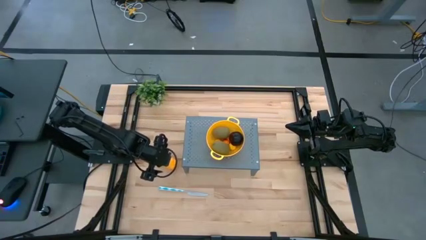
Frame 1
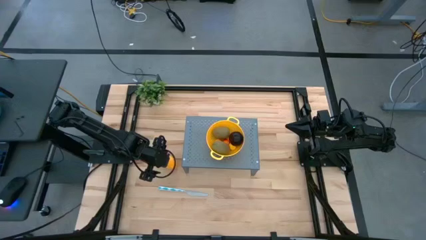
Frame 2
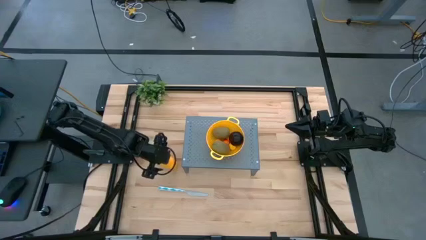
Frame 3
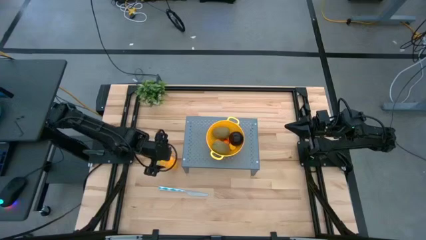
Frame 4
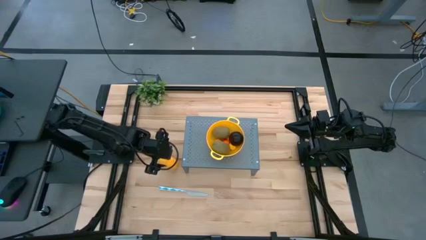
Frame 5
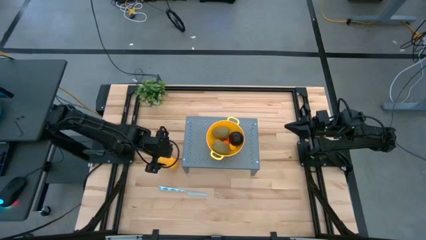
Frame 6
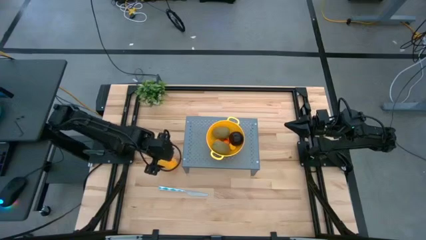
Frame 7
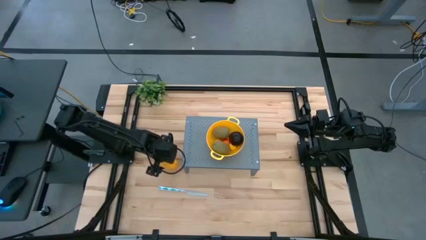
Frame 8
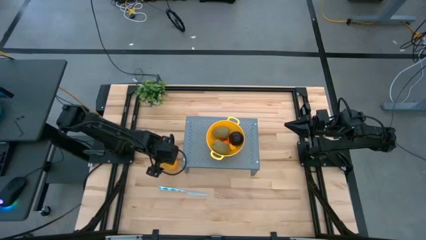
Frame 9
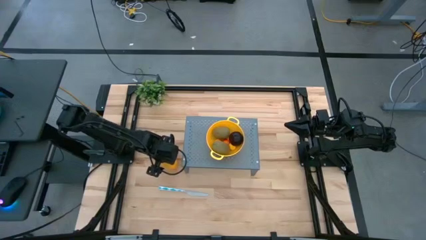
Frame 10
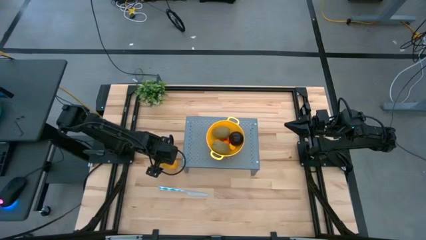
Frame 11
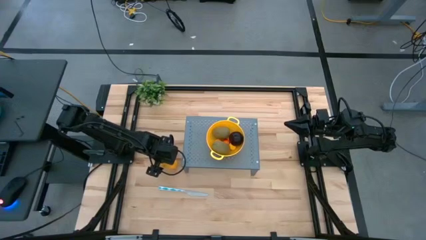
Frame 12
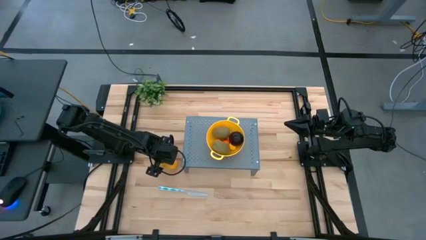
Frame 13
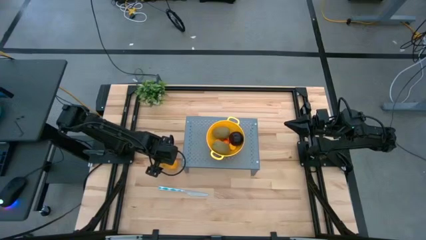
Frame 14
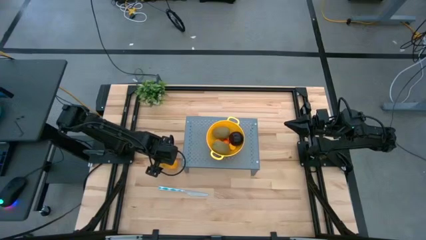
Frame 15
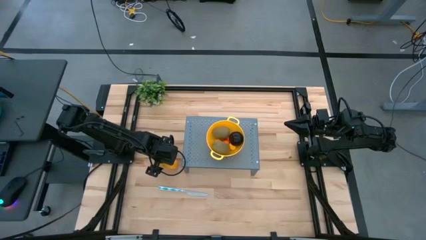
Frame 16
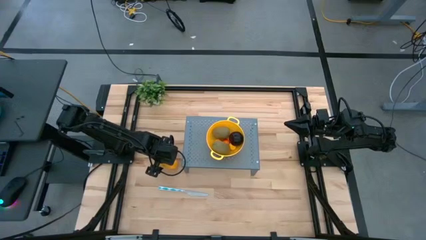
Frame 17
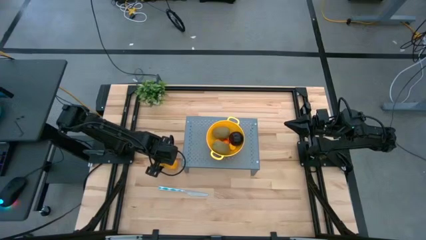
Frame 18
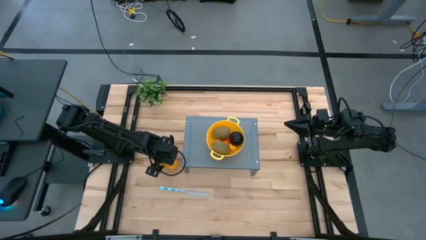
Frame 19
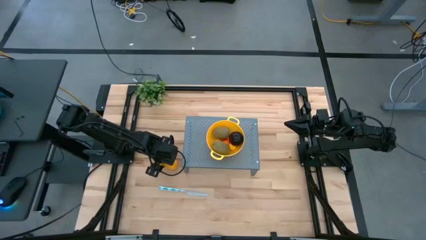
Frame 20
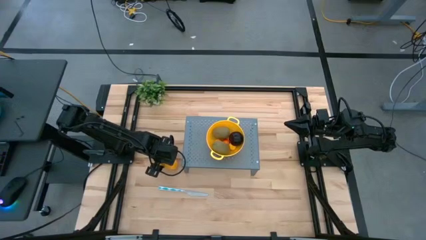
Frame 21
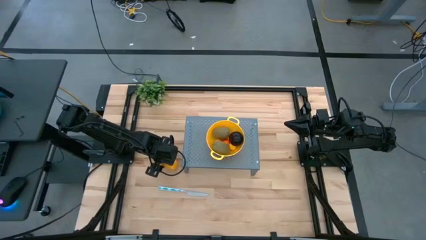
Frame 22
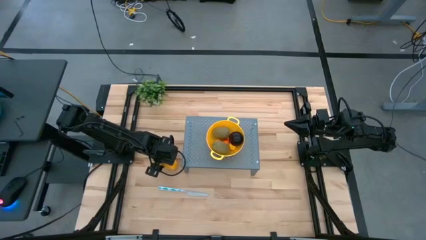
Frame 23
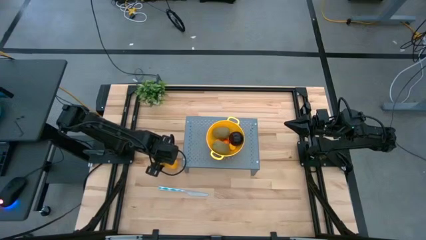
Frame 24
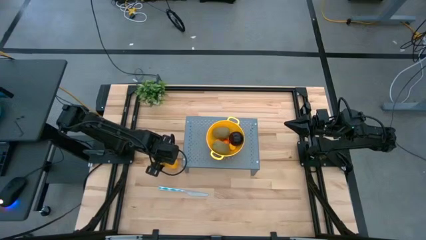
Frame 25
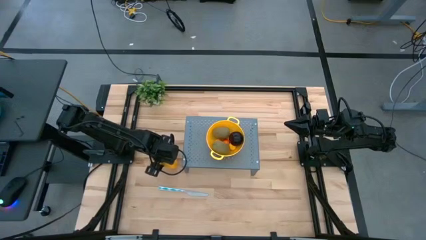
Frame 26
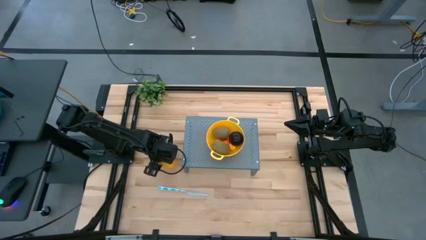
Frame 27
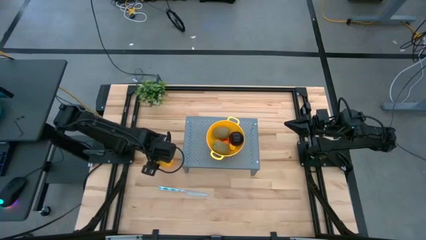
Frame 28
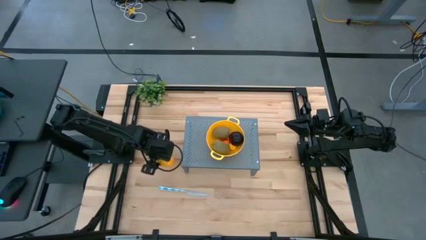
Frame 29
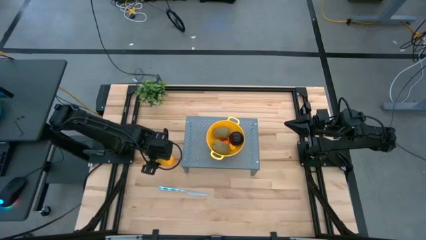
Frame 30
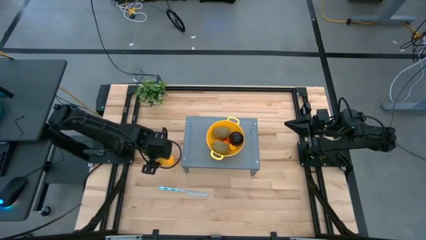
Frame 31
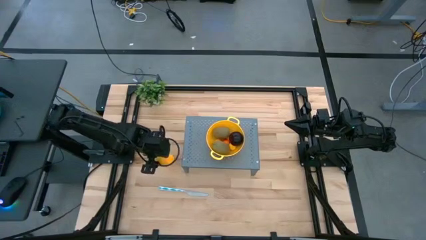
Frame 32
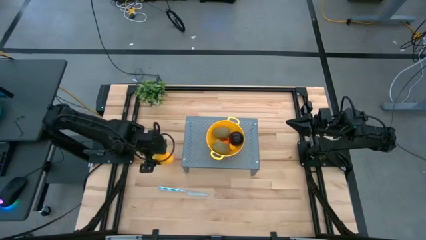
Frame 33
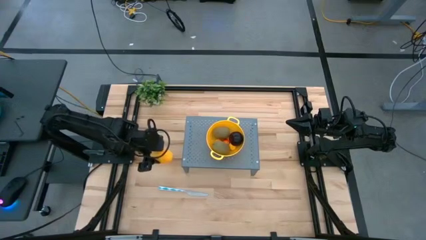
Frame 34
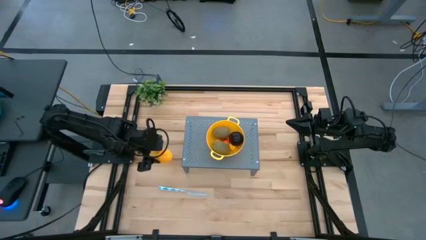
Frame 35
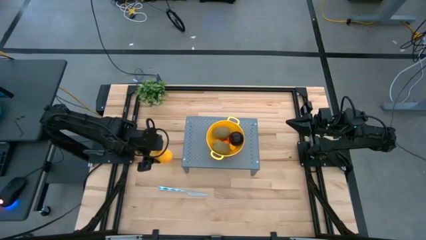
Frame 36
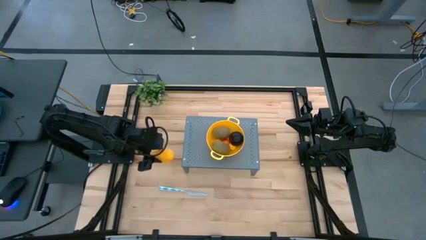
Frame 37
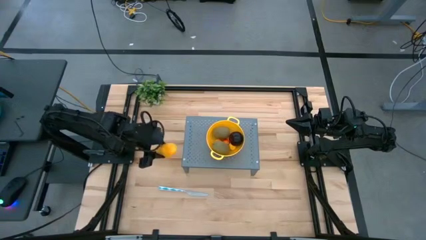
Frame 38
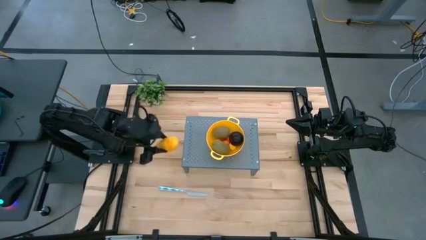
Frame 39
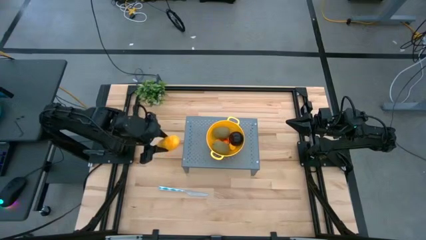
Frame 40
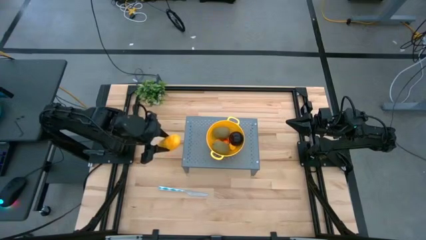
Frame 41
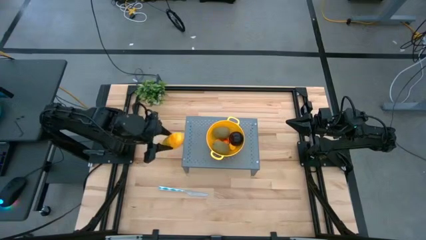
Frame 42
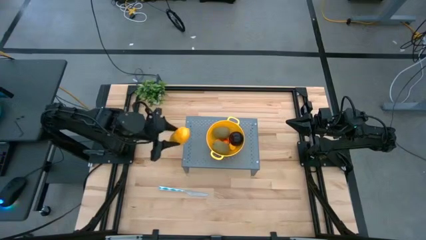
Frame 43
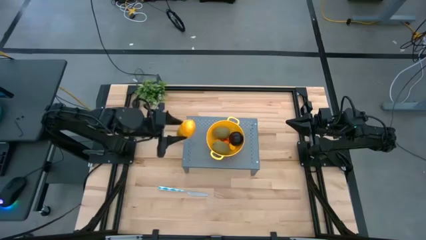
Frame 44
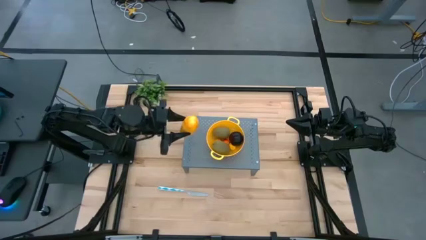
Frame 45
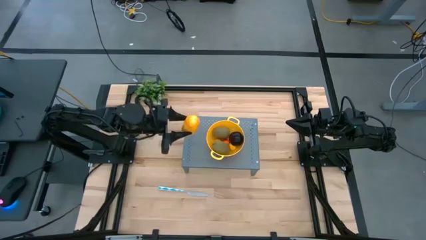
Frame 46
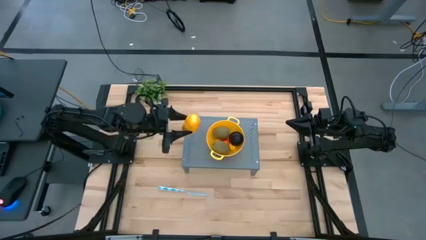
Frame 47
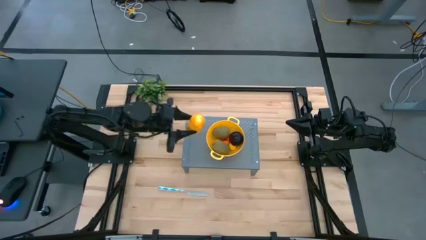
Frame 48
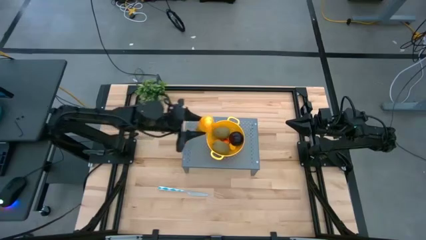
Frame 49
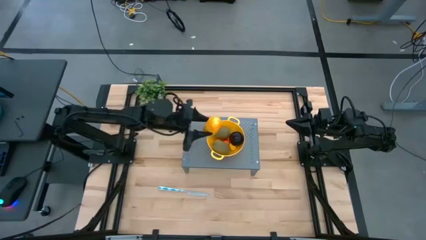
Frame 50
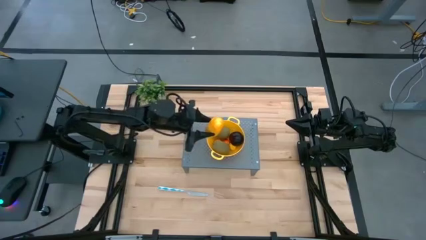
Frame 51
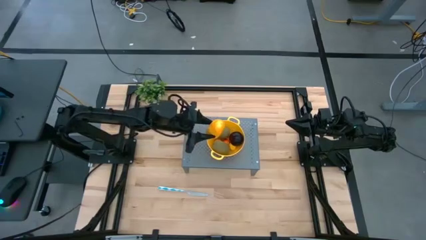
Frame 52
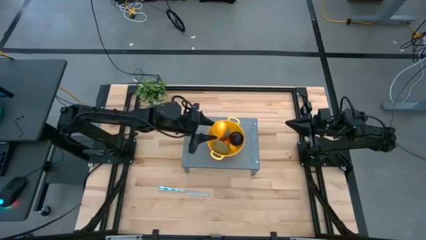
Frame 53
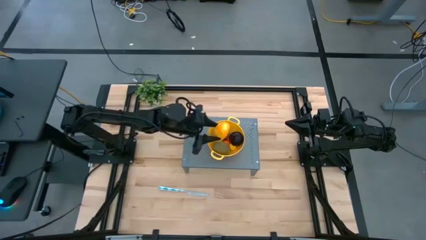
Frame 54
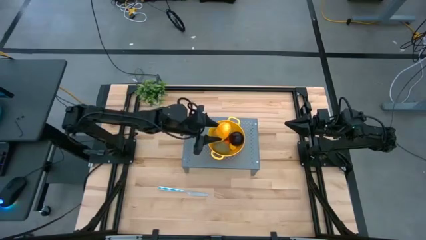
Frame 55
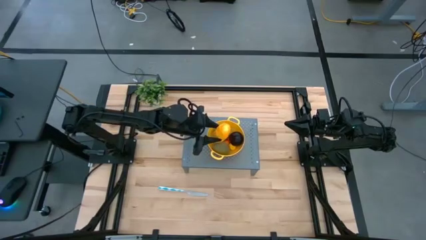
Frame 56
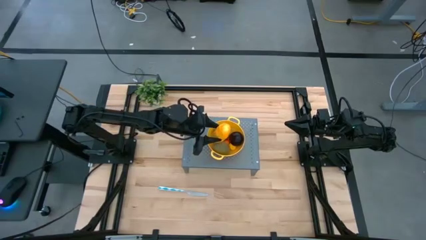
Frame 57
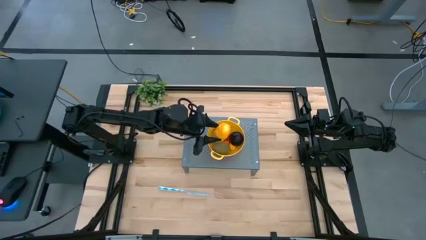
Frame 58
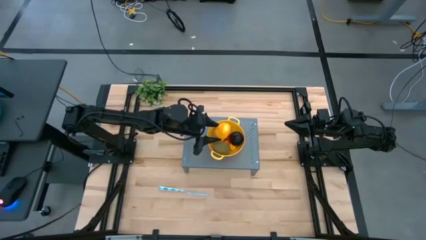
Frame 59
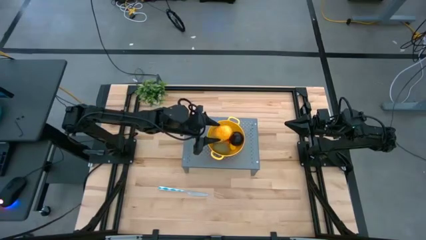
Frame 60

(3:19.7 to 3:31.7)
Task: Pick & Place Fruit
Put the mango into the strainer bowl on the shelf

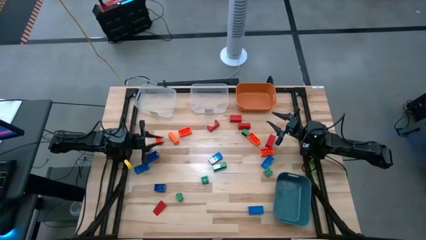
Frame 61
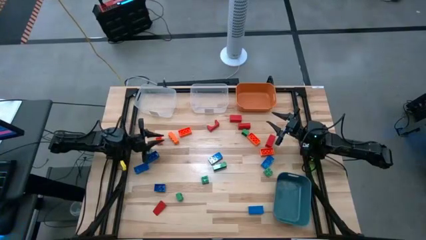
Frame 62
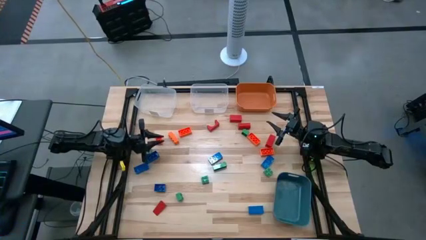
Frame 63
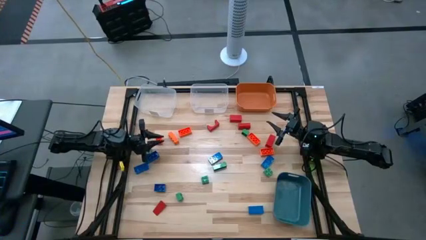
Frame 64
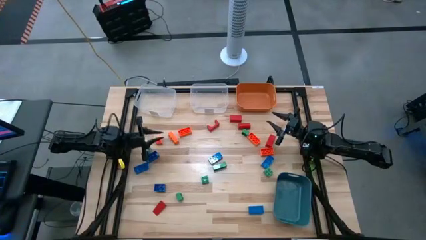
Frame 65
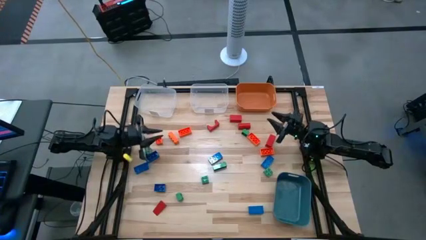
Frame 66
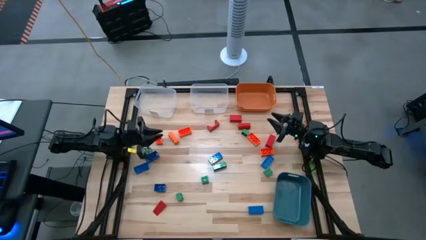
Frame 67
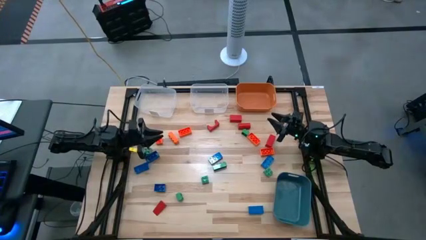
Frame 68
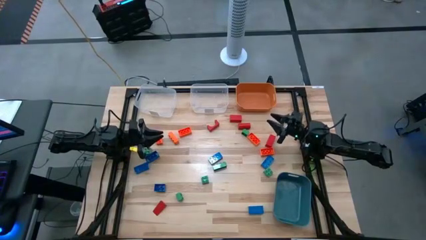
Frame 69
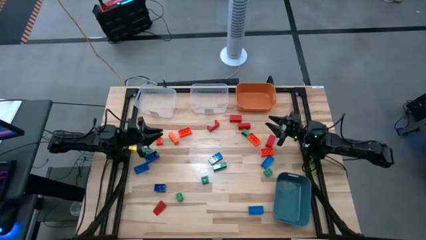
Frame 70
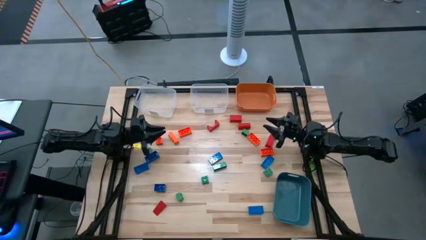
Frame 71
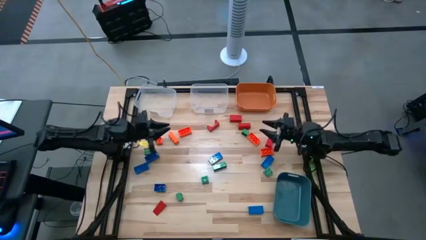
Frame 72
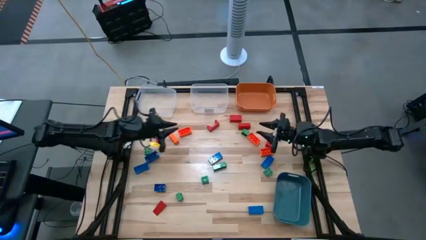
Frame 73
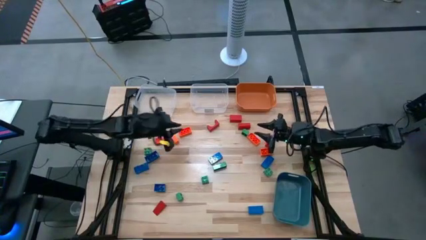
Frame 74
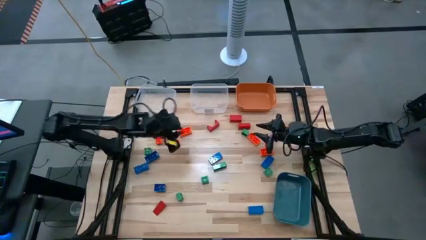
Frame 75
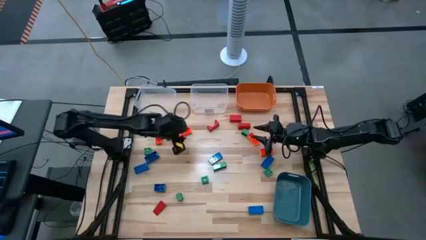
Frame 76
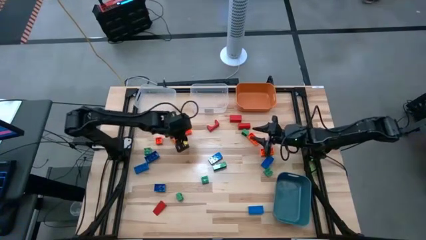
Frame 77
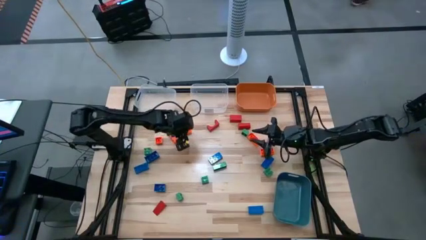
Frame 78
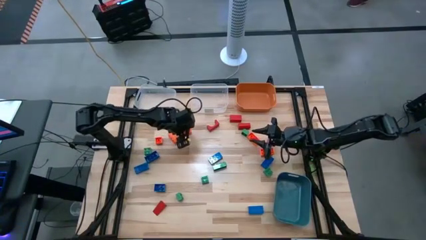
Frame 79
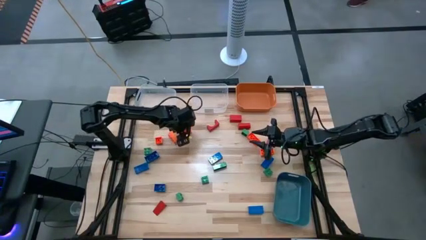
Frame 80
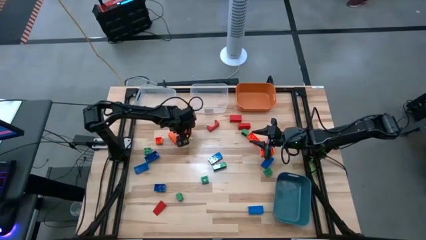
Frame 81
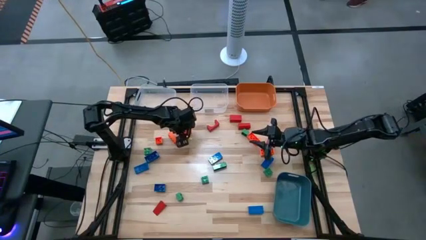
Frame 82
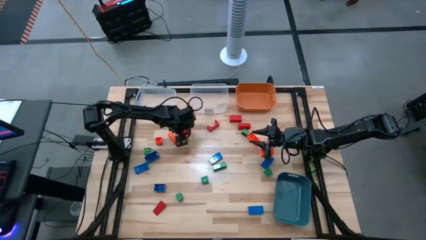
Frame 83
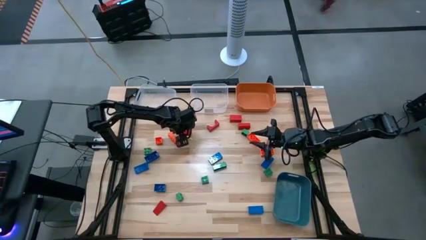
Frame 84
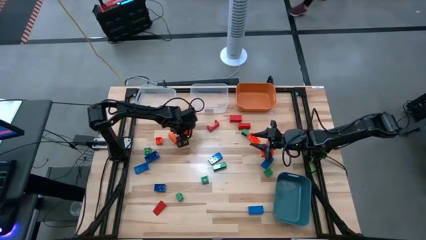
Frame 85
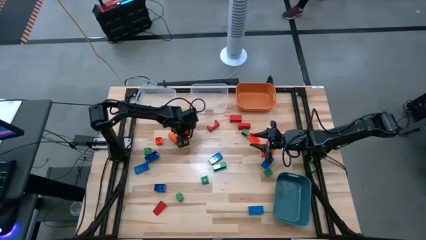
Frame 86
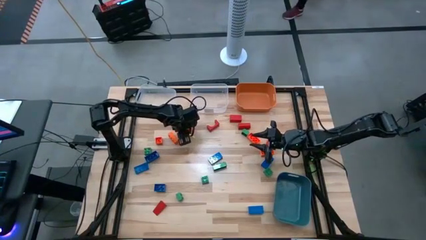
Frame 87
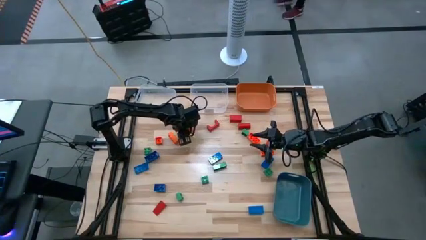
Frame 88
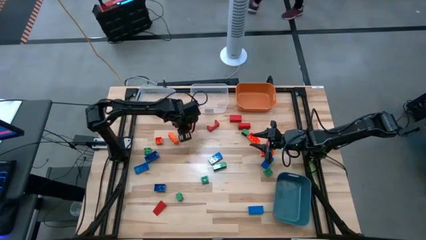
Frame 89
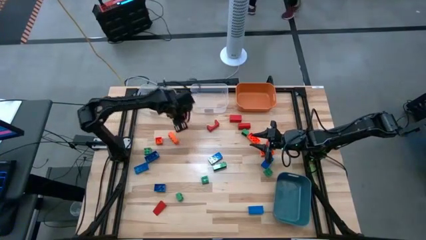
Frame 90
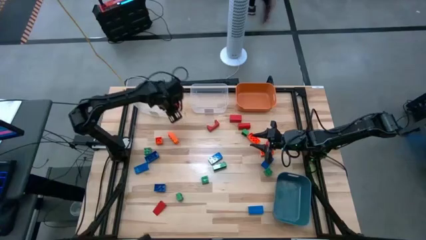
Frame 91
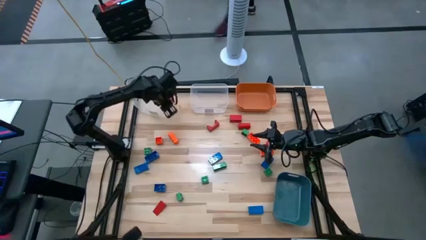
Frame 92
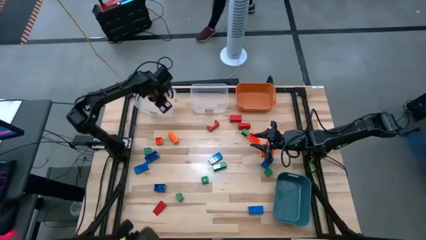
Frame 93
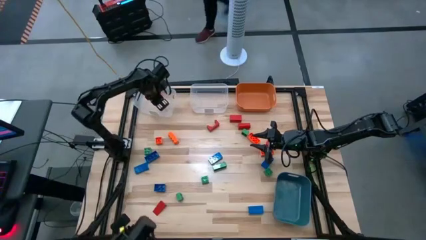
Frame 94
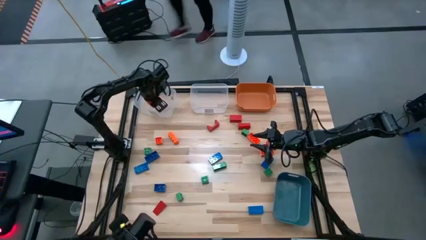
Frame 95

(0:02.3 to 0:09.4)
Task: Sort blocks
Put the orange game piece into the left transparent bin
